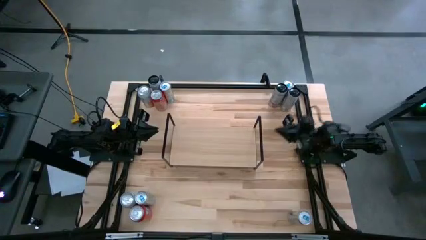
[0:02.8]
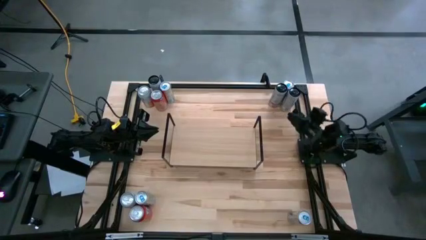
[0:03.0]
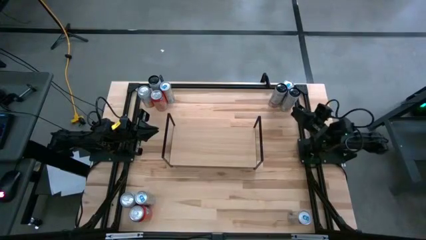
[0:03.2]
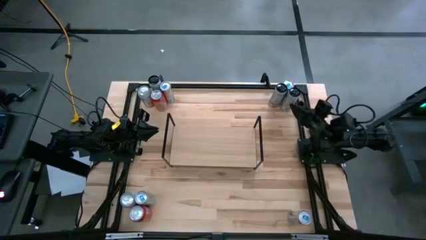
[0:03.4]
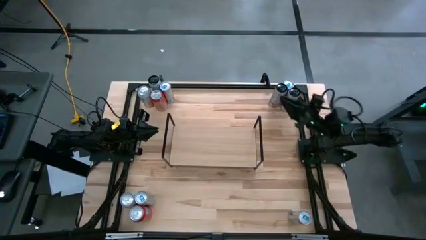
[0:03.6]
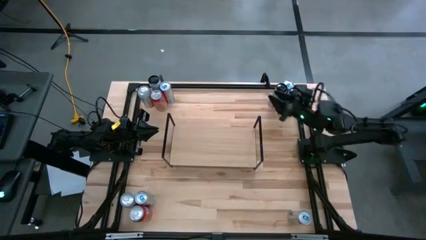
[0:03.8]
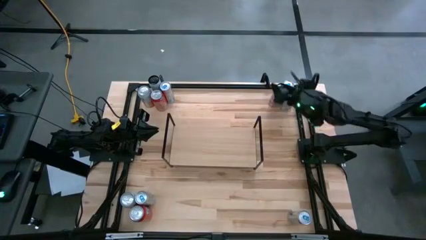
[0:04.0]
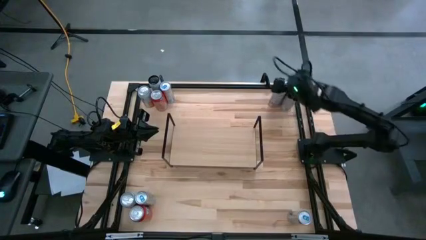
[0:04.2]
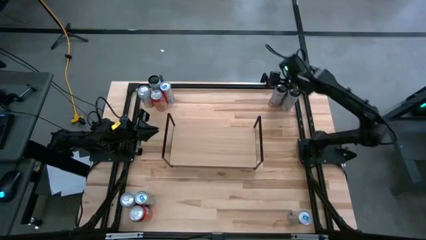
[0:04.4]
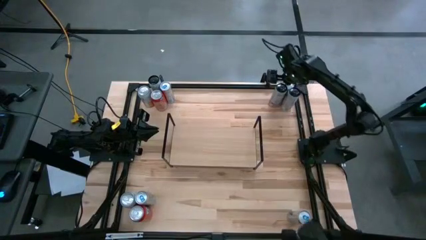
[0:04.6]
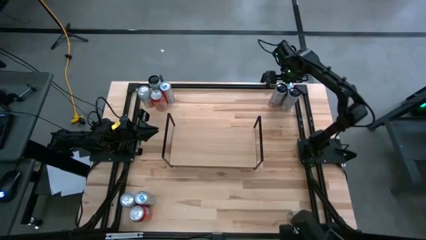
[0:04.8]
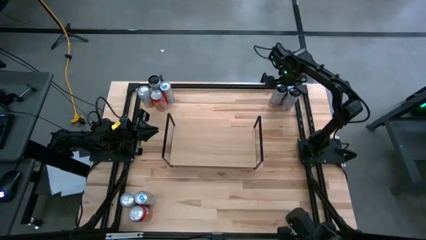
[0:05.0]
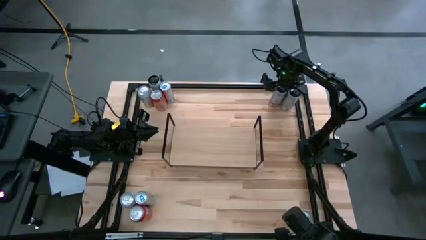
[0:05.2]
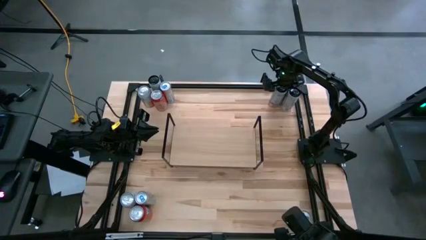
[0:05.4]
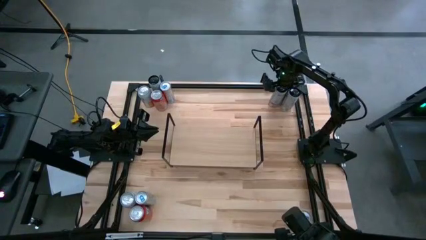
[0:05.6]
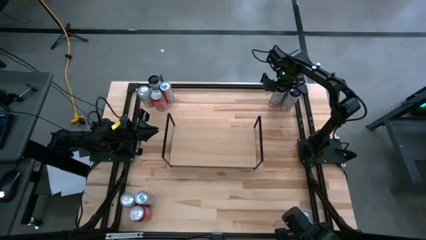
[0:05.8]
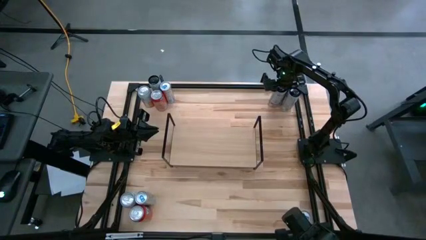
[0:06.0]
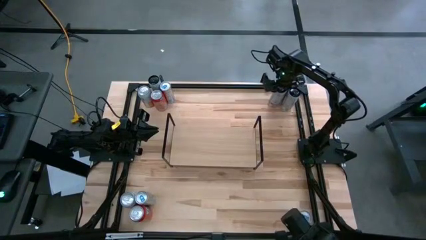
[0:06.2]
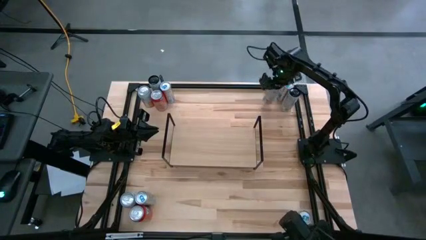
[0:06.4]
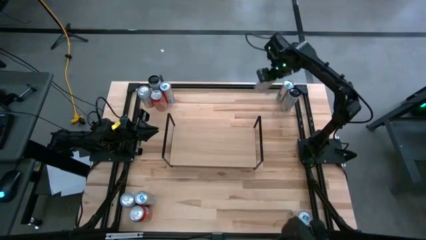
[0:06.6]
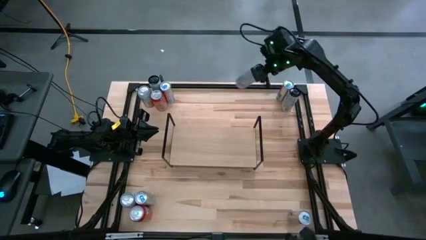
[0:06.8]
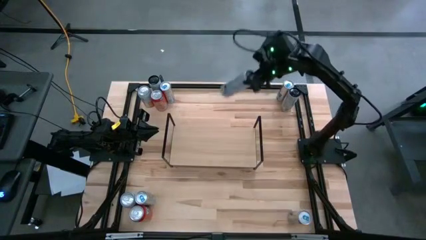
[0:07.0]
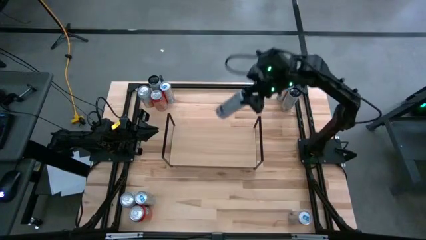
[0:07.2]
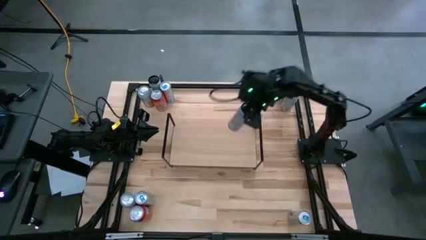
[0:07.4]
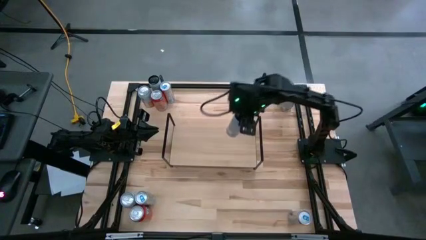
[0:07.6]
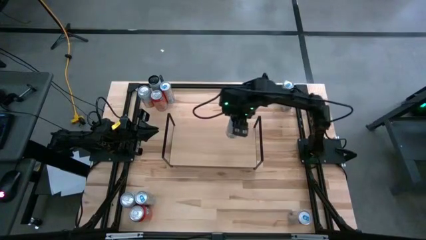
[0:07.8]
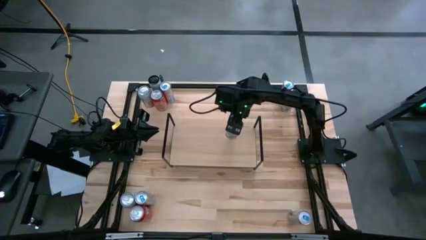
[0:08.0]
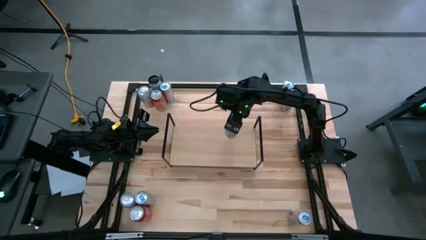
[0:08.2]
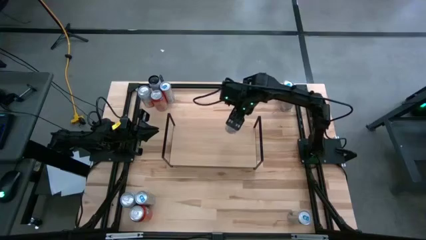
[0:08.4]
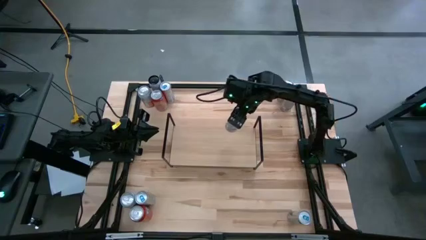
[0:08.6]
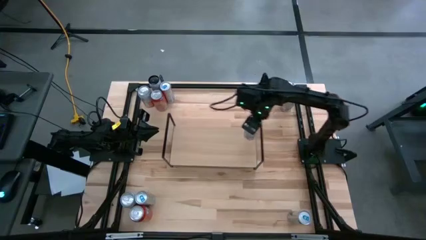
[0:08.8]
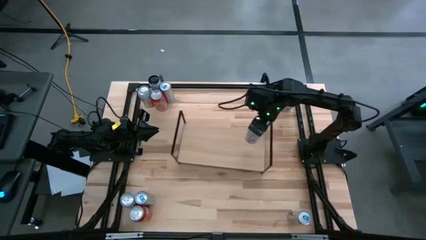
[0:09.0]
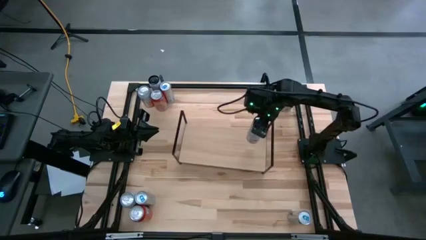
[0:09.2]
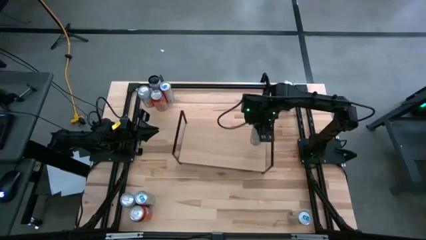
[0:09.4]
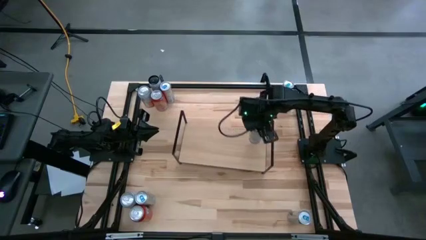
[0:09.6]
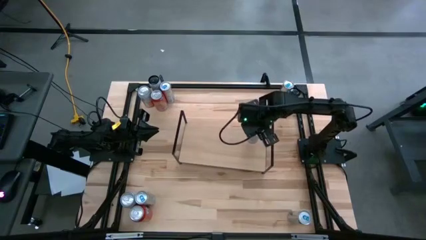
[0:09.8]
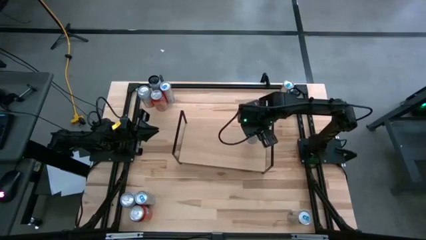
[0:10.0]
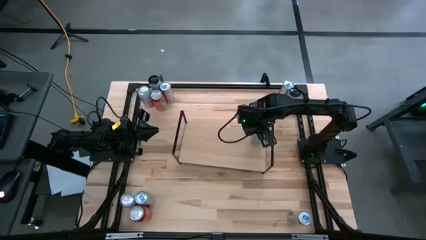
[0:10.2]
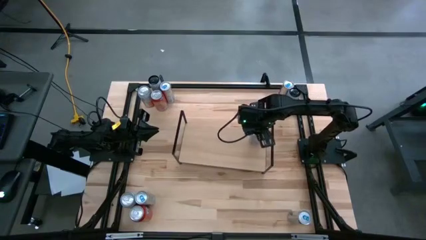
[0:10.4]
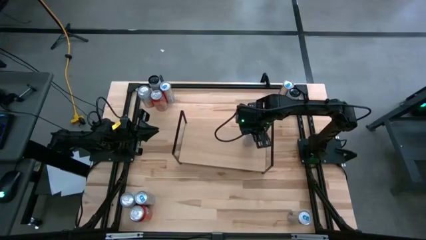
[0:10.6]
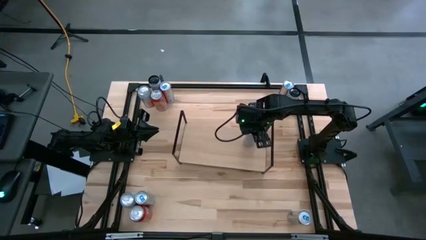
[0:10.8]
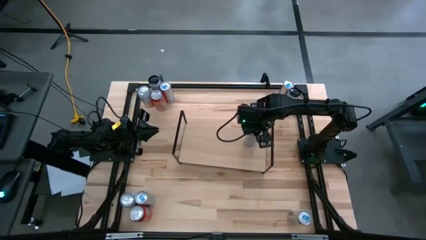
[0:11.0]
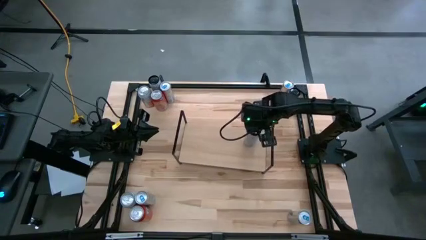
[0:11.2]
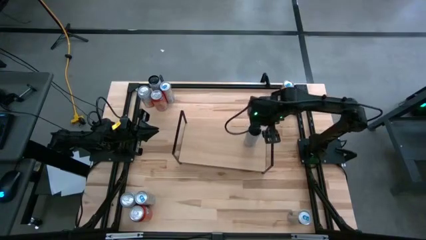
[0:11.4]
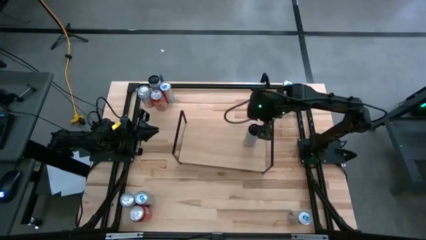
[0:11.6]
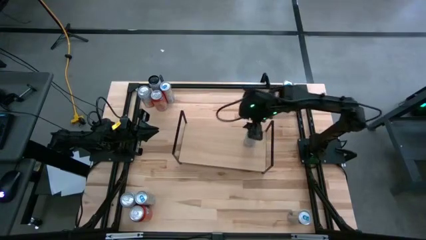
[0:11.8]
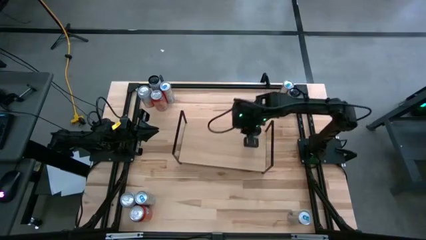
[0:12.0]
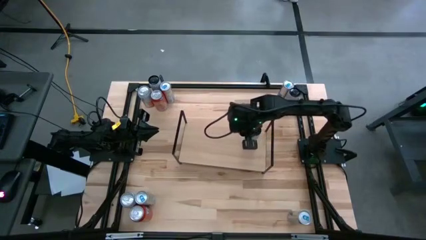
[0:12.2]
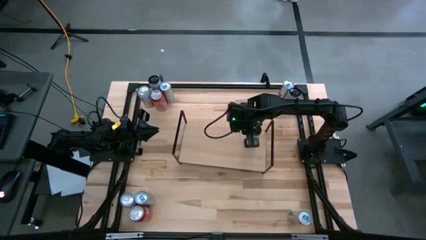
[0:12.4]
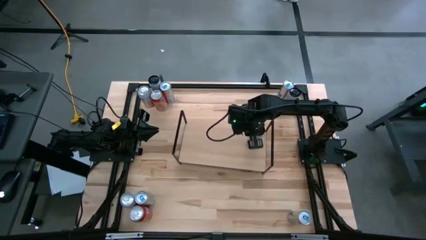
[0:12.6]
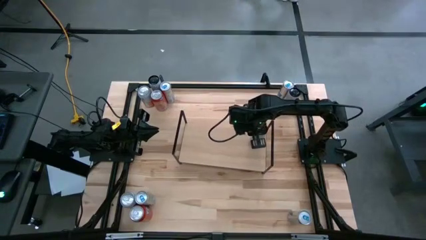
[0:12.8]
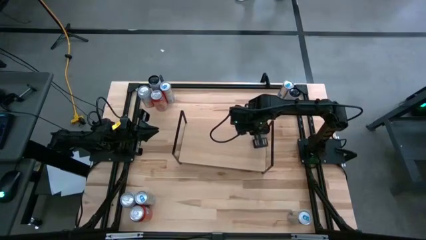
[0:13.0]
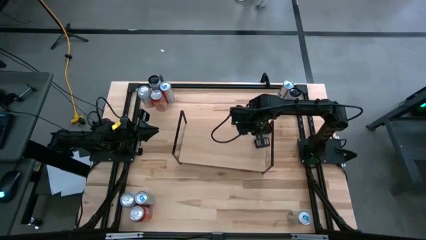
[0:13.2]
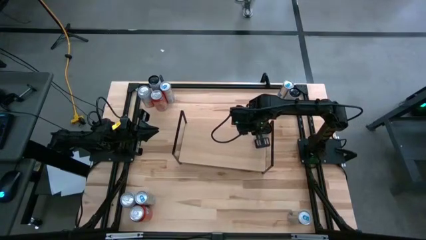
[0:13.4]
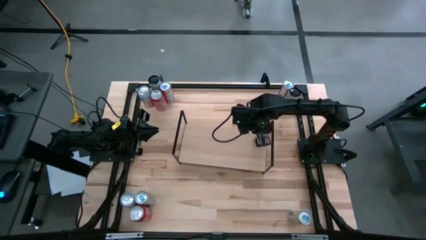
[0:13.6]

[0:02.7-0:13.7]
Task: Place canned beverage on shelf
Put the white soda can on the shelf

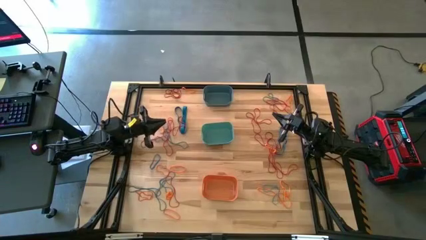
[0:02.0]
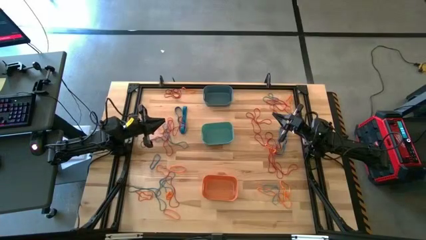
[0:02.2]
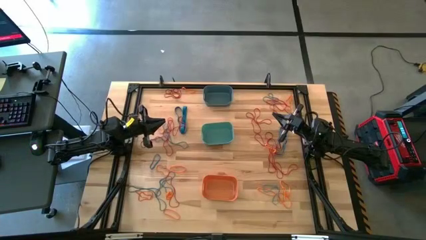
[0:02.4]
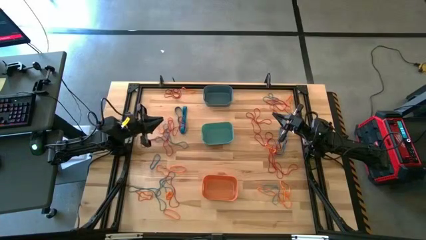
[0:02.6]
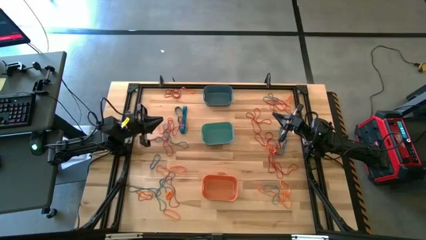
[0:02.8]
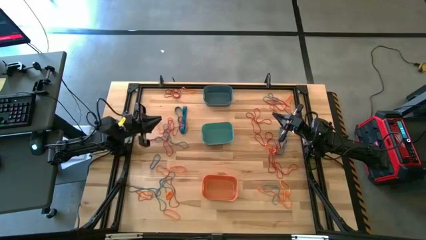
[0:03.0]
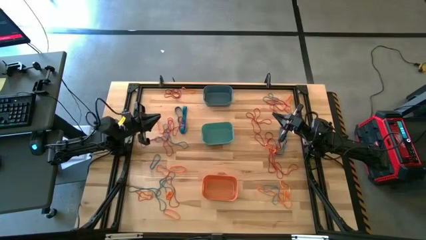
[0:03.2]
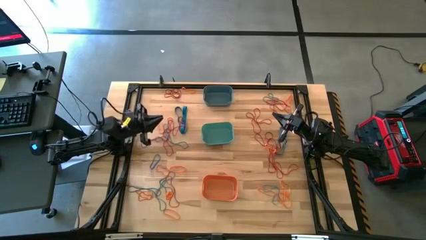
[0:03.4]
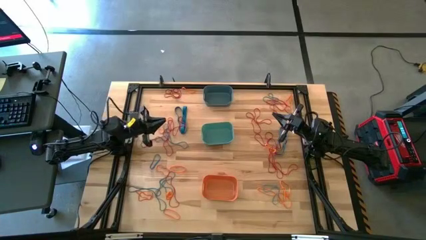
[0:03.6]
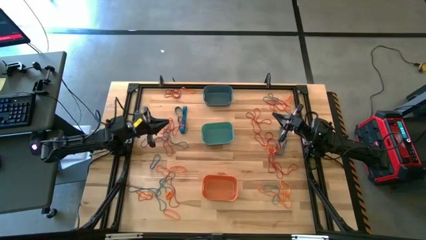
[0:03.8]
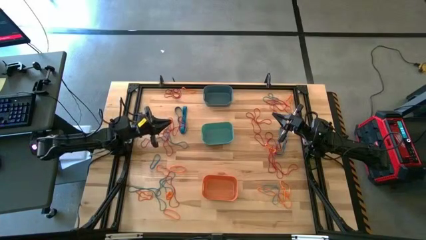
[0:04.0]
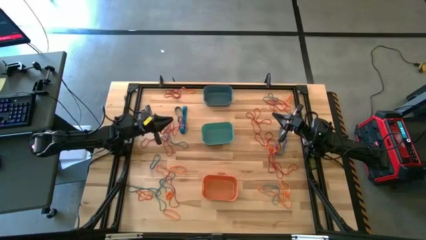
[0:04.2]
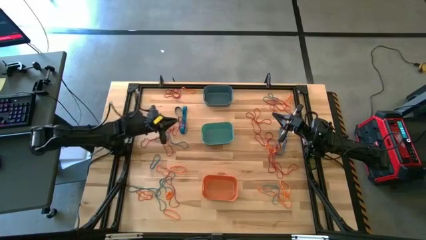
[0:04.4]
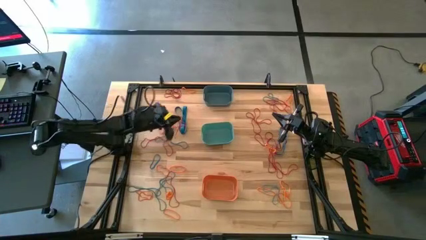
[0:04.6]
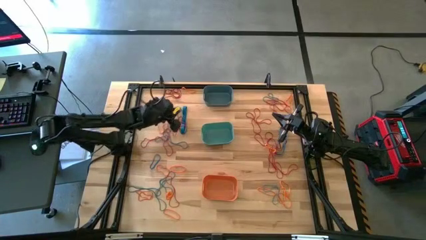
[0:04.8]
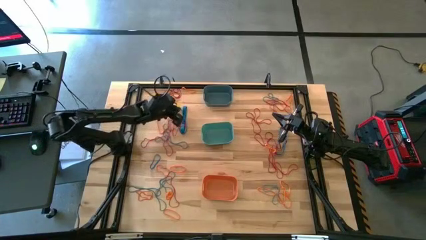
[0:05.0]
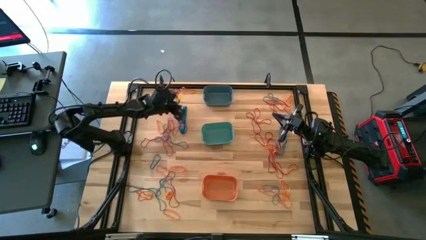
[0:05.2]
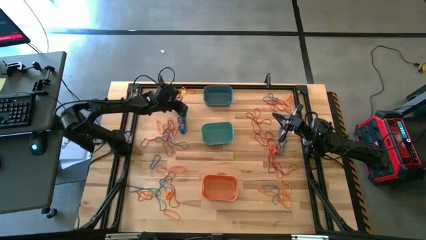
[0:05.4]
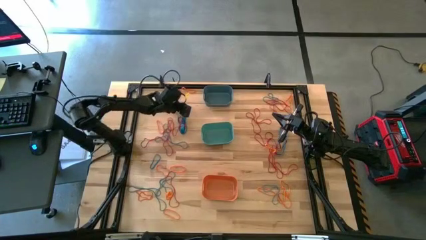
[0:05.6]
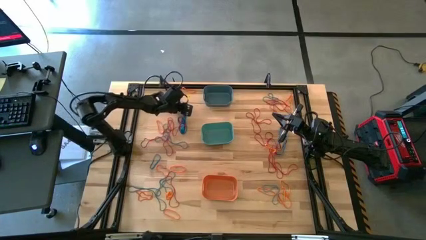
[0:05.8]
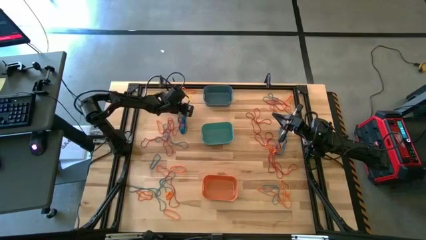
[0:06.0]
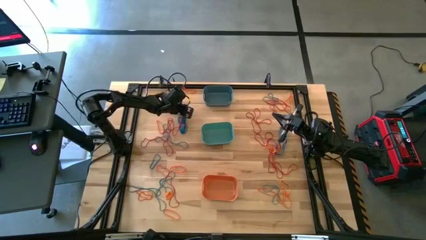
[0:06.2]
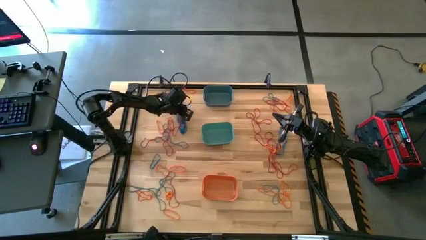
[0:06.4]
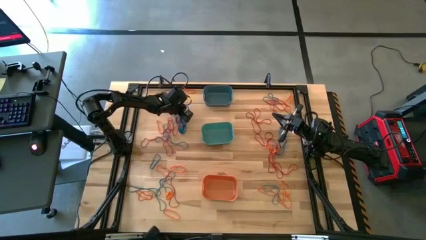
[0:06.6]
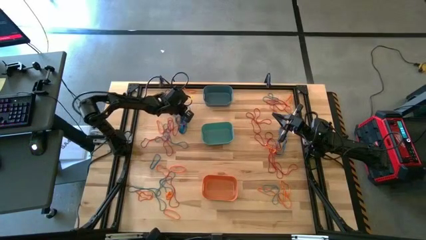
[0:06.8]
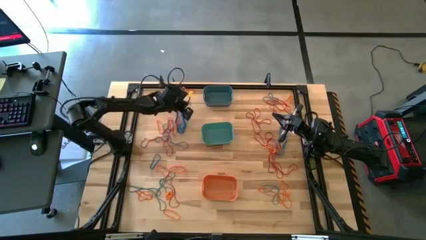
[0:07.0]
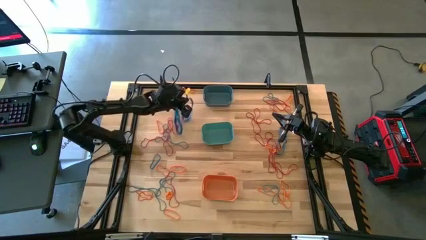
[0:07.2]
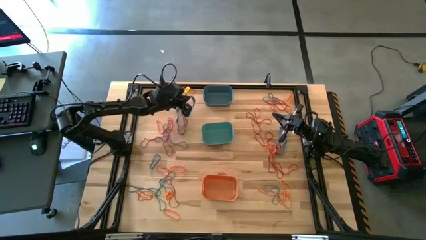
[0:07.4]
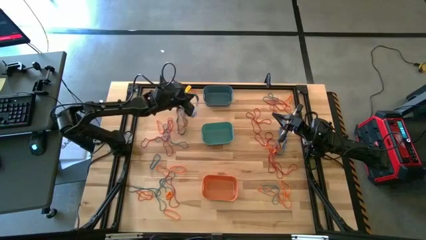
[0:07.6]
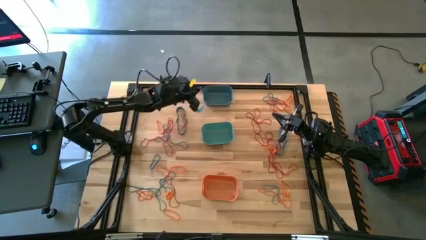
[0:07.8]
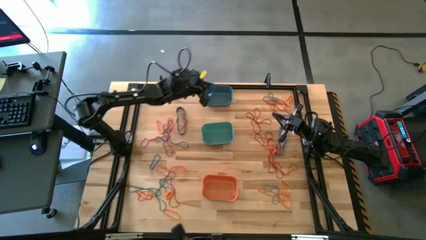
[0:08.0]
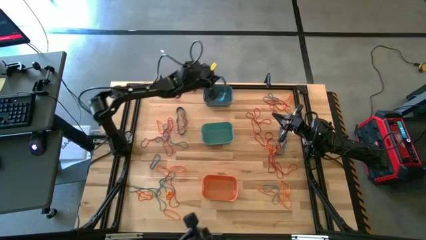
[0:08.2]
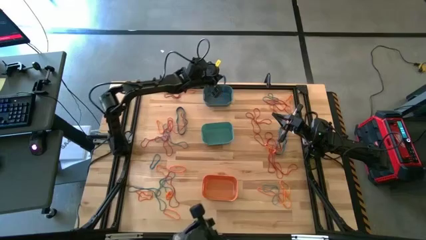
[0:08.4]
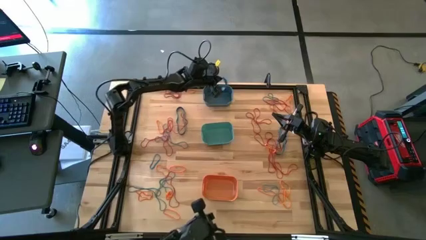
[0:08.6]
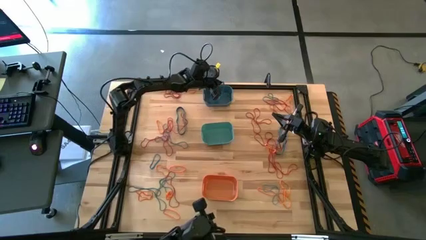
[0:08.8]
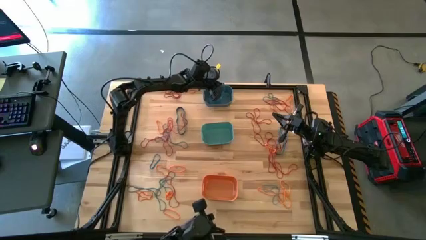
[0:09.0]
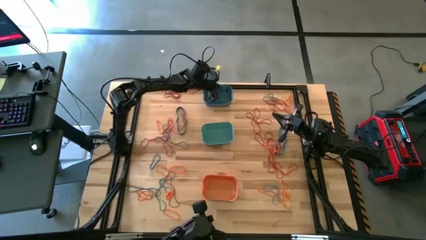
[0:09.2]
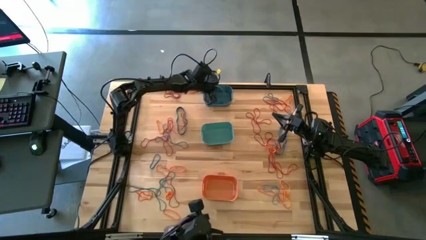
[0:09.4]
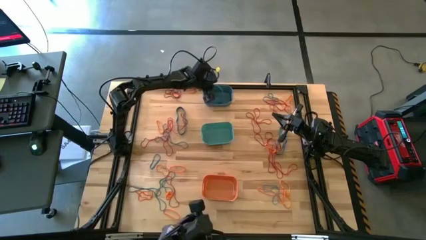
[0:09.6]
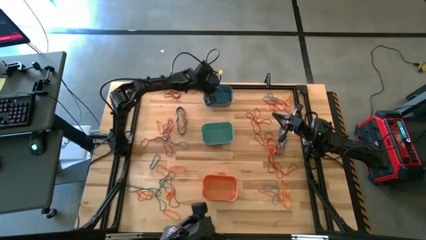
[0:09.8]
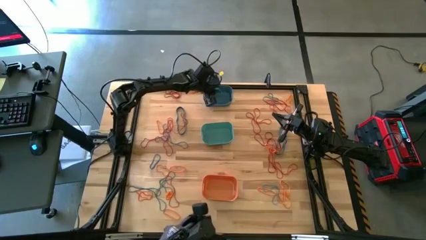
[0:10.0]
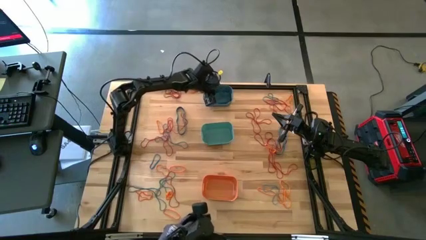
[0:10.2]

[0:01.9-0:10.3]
Task: Sort rubber bands into baskets
Put the blue rubber band into the blue bin
